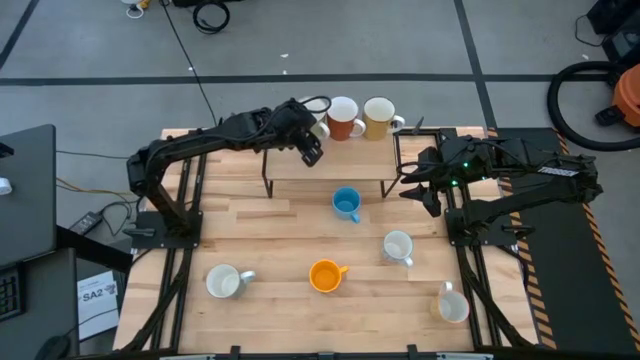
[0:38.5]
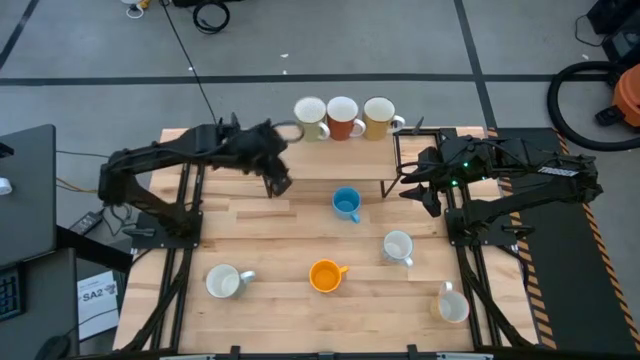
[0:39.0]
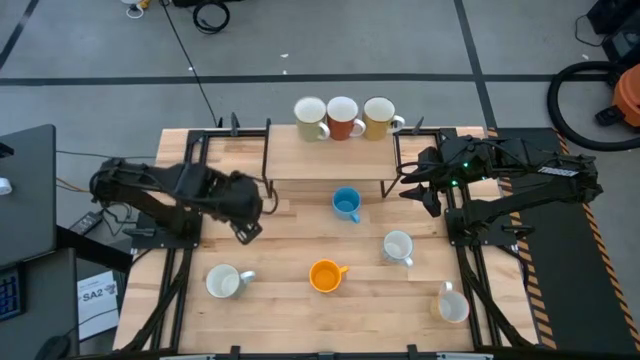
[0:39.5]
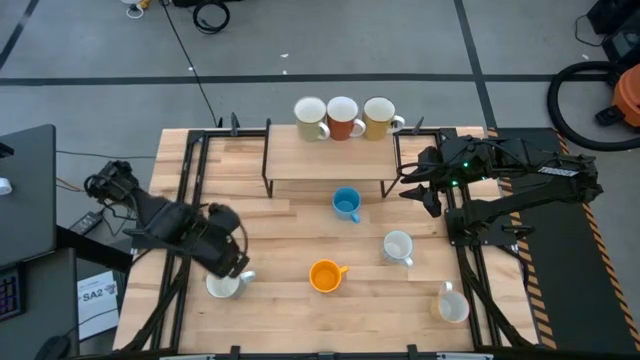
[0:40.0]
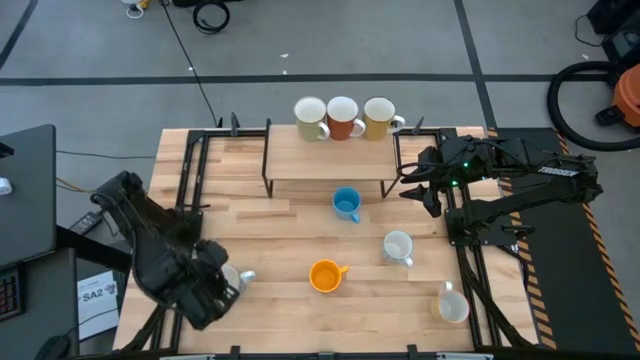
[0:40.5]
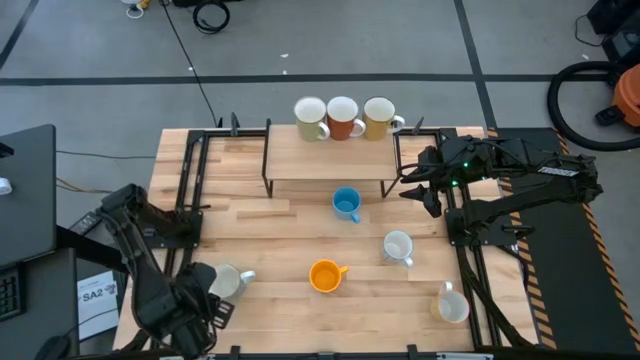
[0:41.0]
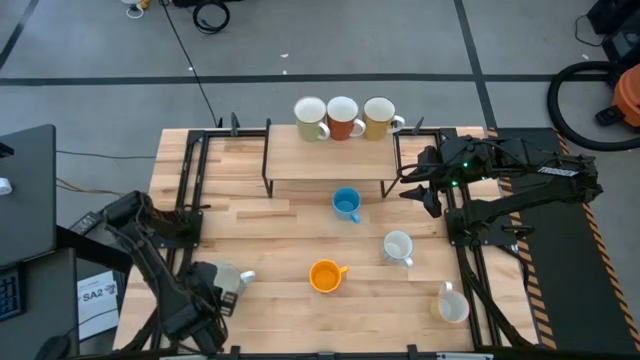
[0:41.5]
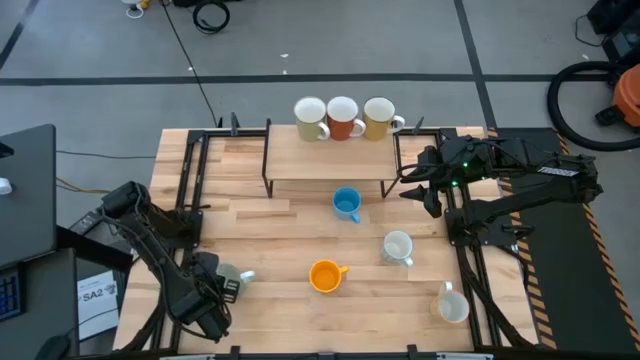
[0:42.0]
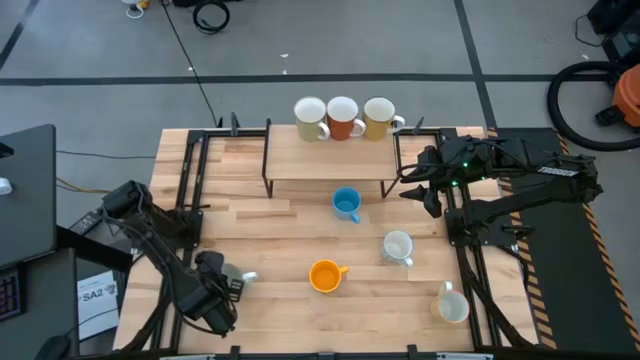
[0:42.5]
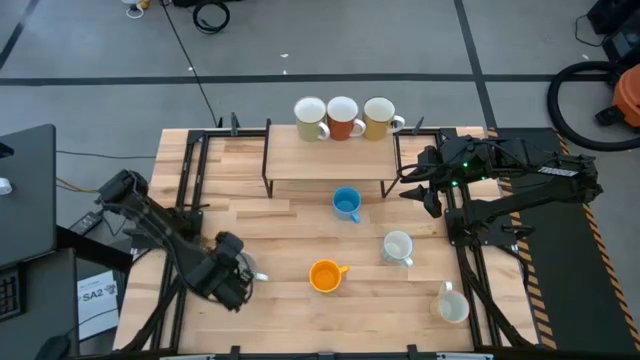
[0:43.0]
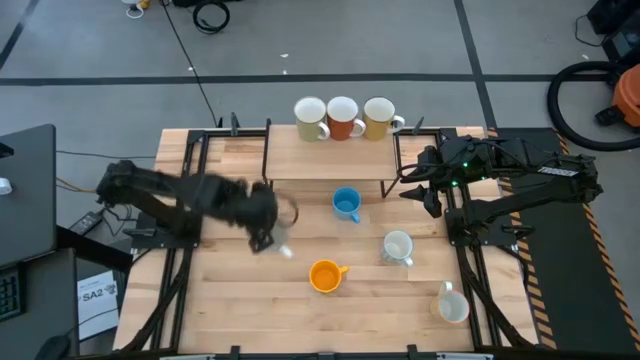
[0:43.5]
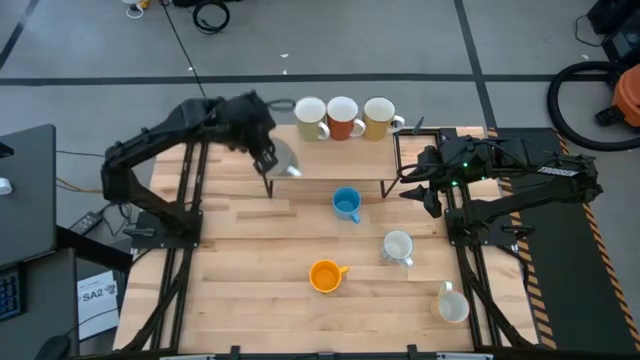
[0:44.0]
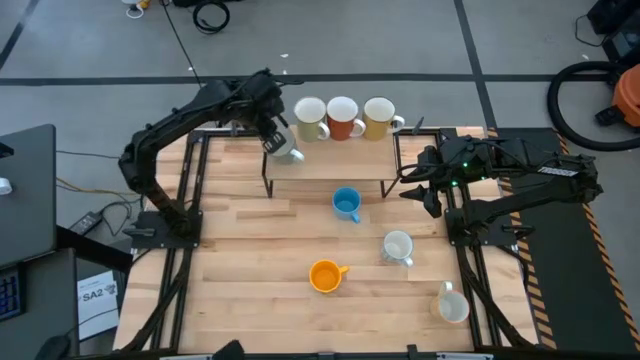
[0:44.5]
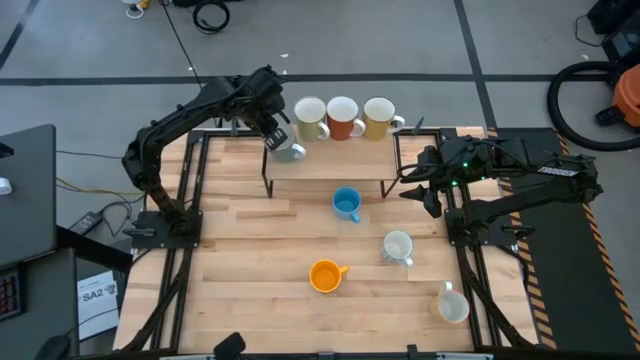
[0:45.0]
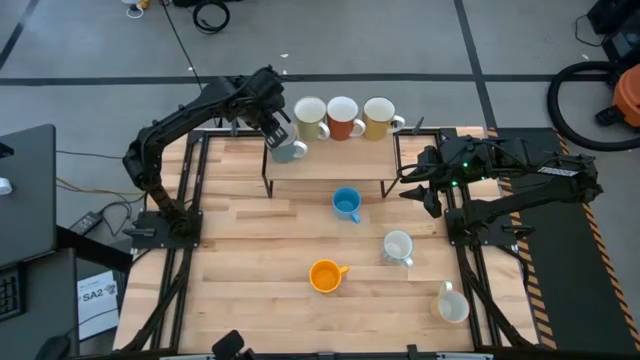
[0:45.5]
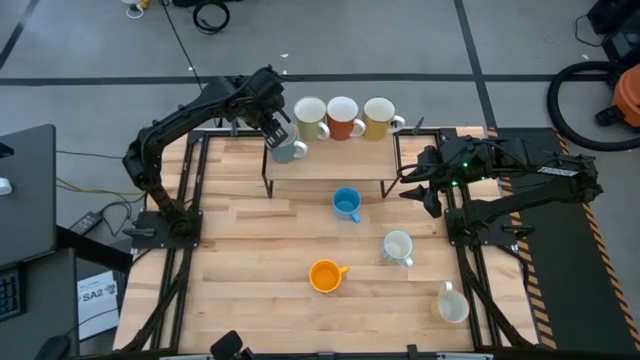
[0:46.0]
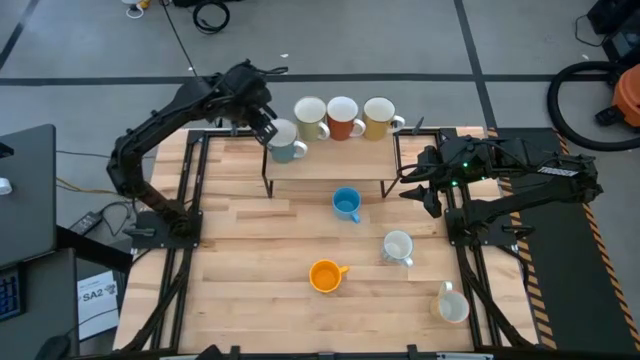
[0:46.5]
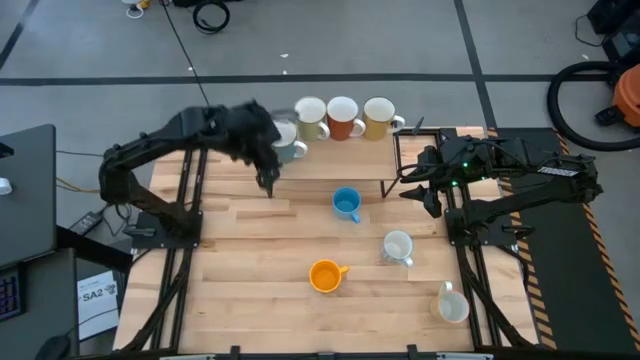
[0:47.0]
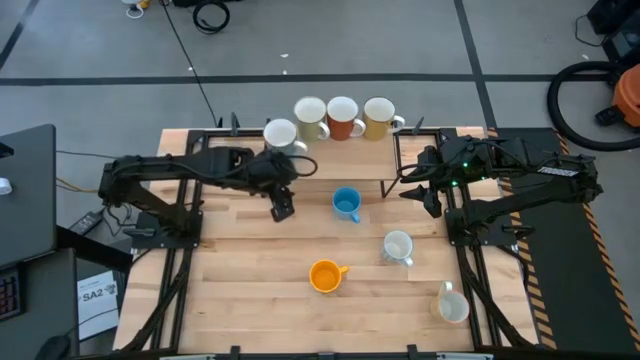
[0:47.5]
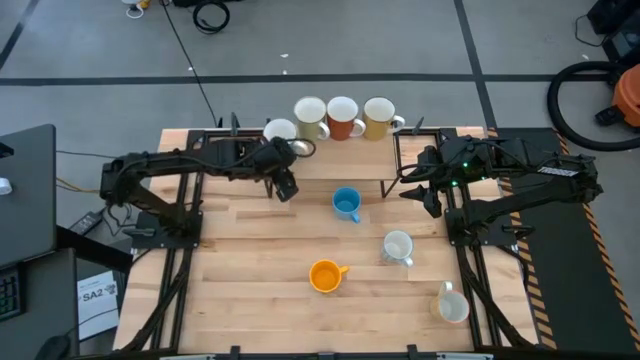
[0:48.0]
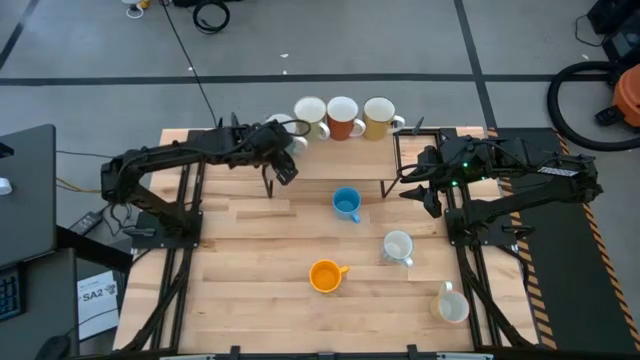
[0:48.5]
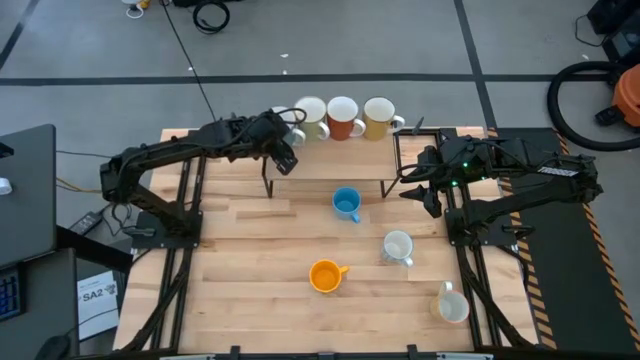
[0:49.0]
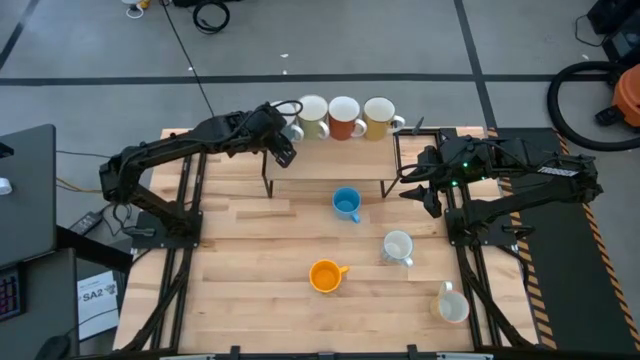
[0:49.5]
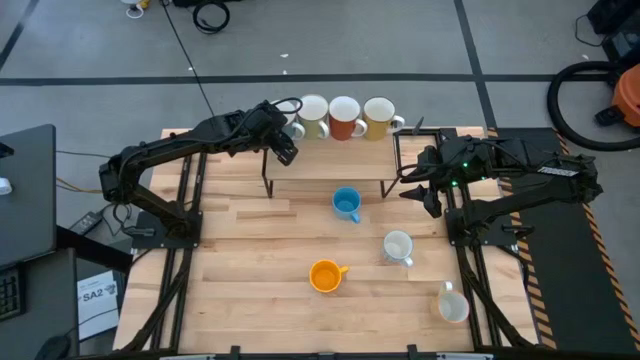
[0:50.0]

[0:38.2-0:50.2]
Task: Place coffee mugs
Put the light blue mug on the shelf

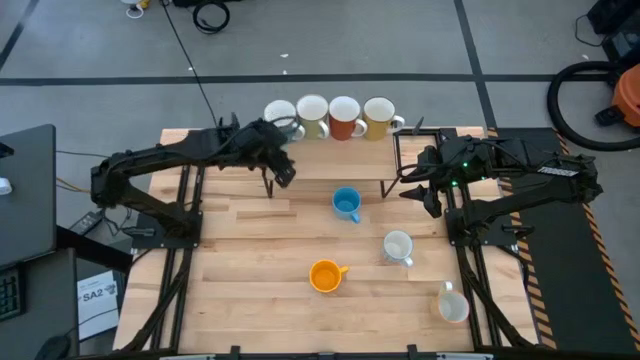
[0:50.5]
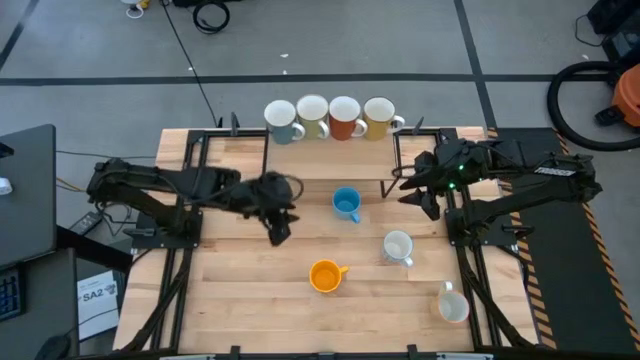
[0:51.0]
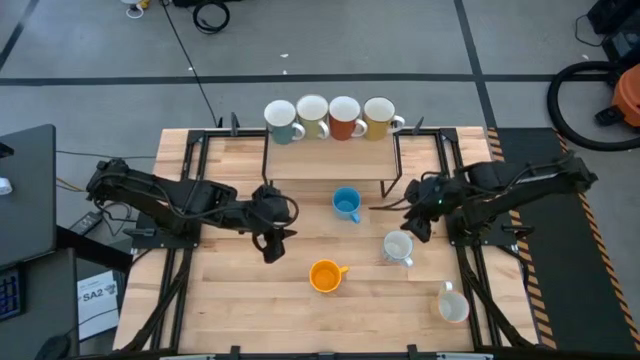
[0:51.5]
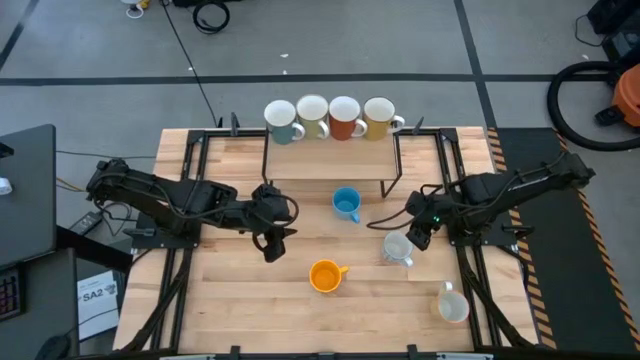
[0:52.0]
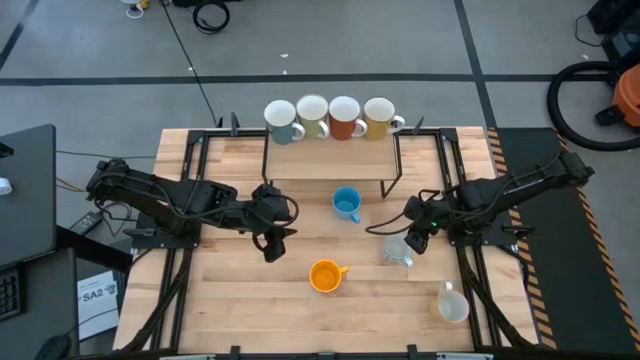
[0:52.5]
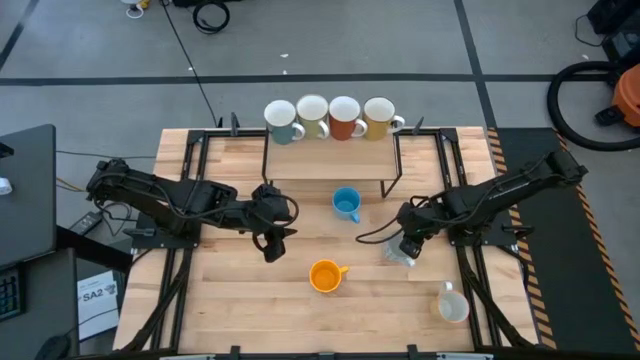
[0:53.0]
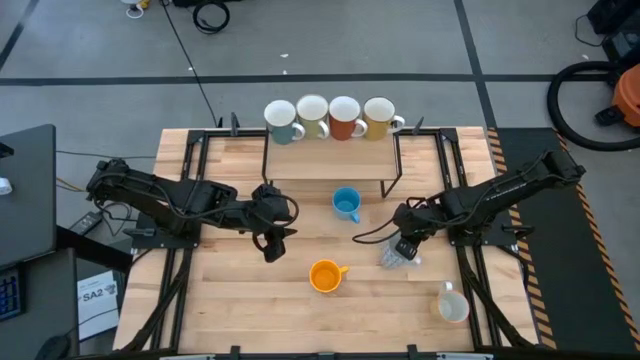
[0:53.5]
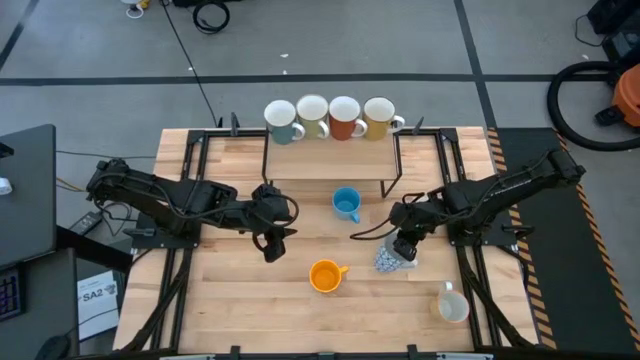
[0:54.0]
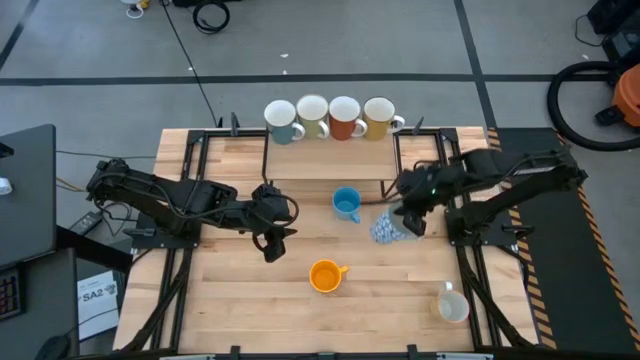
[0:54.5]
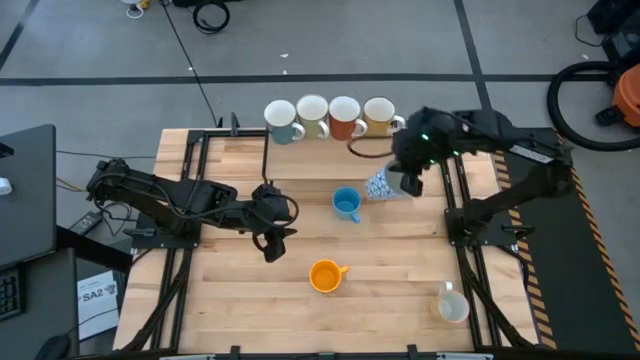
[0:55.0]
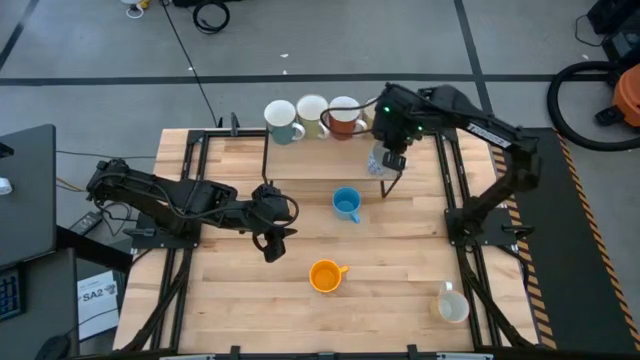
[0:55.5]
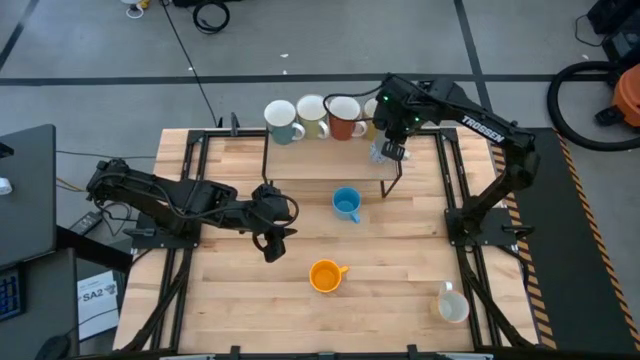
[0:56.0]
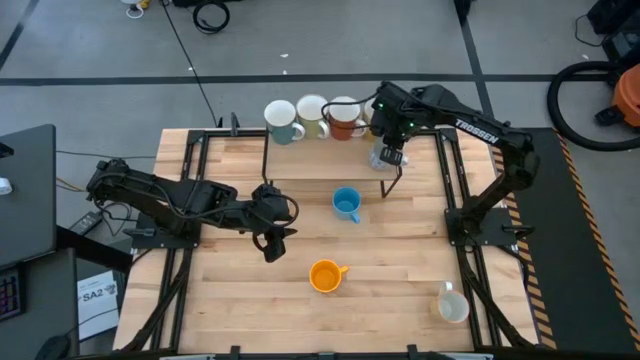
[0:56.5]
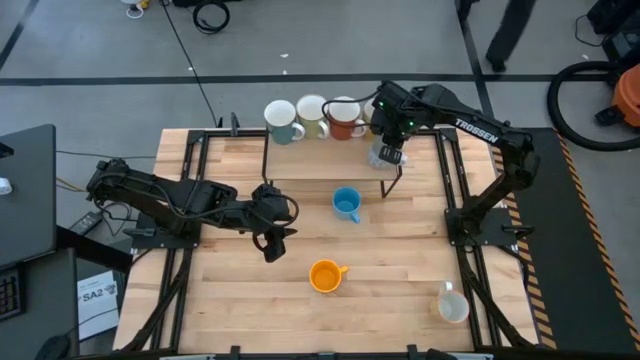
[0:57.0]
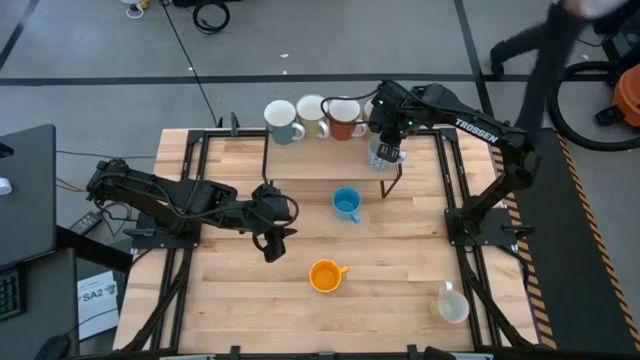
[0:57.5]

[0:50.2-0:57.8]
Put the blue patterned mug on the shelf

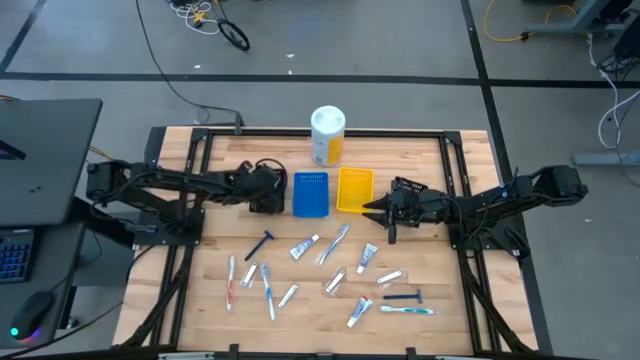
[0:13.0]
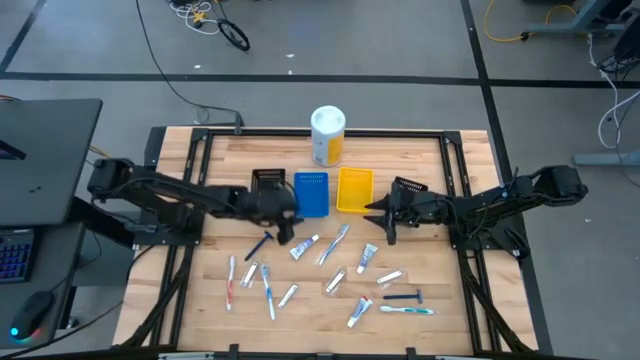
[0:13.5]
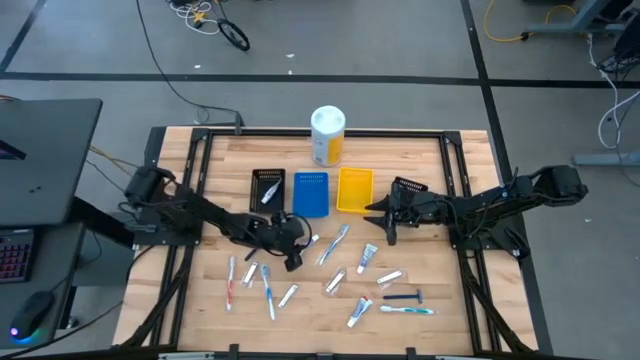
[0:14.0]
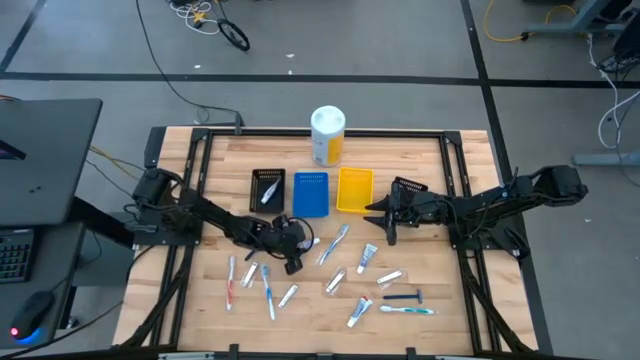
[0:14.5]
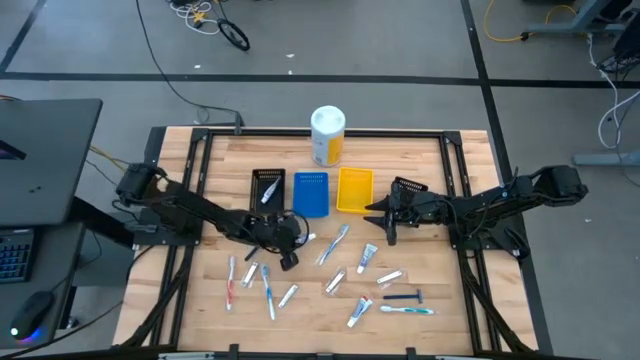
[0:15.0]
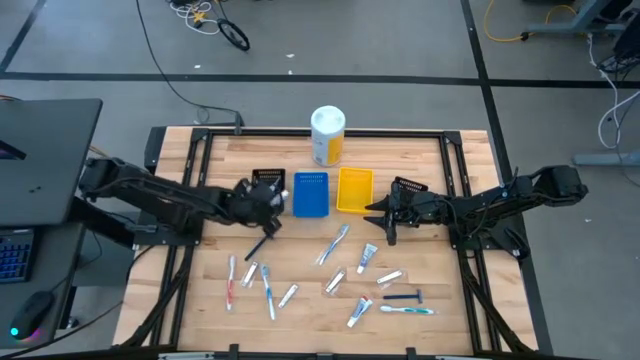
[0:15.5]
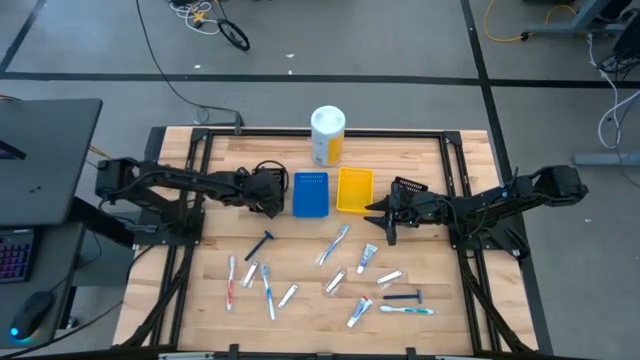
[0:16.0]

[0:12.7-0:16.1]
Task: Pick & Place Travel size toiletries
Put the white toothpaste into the left black bin
